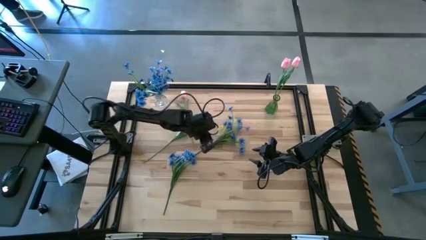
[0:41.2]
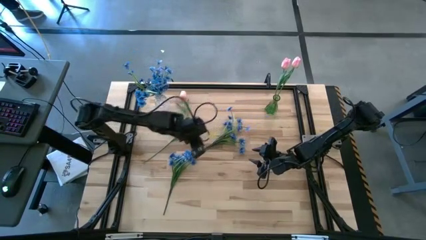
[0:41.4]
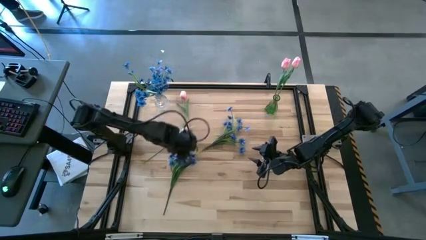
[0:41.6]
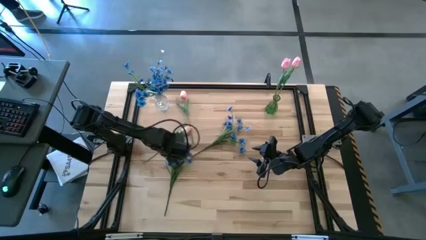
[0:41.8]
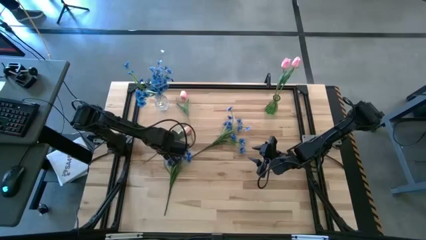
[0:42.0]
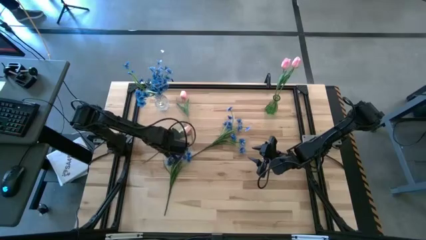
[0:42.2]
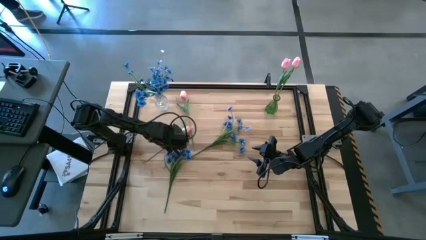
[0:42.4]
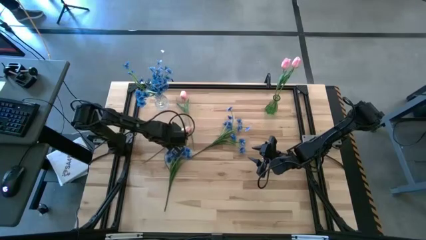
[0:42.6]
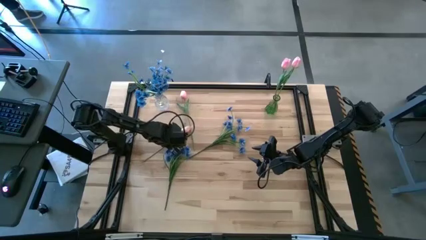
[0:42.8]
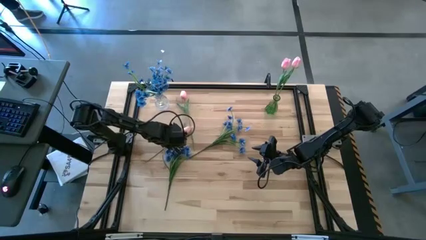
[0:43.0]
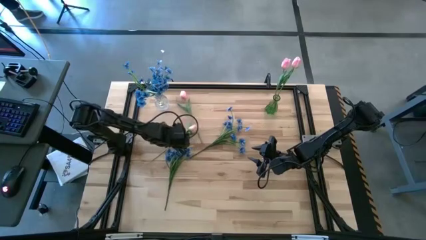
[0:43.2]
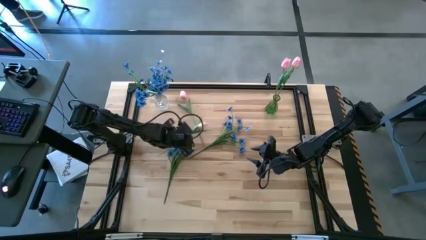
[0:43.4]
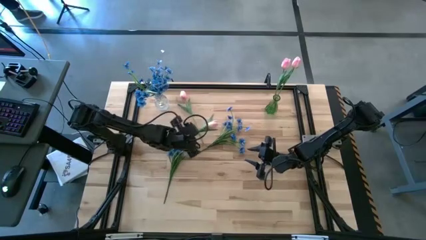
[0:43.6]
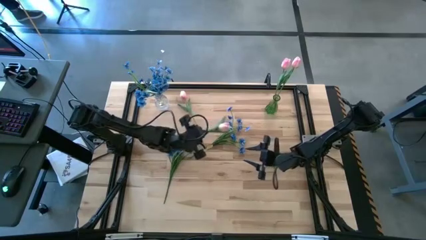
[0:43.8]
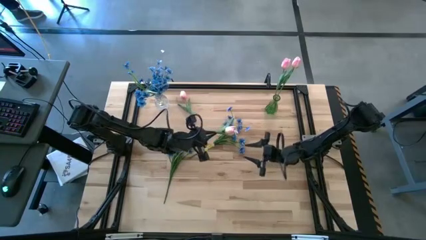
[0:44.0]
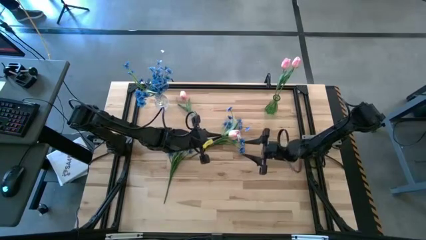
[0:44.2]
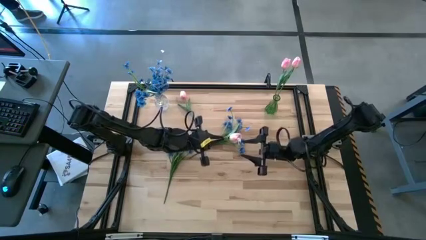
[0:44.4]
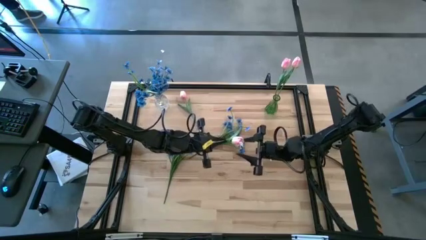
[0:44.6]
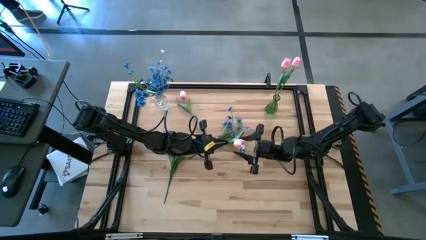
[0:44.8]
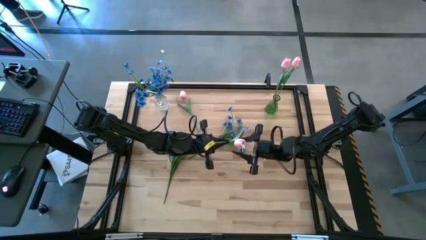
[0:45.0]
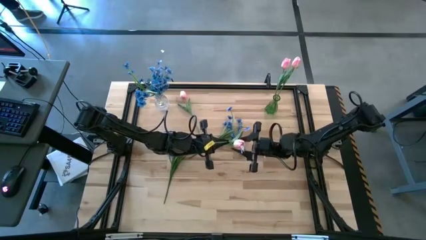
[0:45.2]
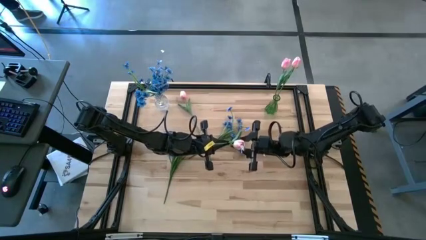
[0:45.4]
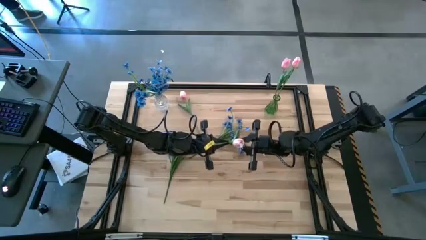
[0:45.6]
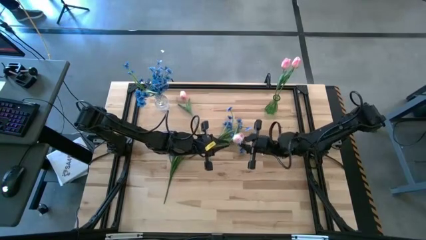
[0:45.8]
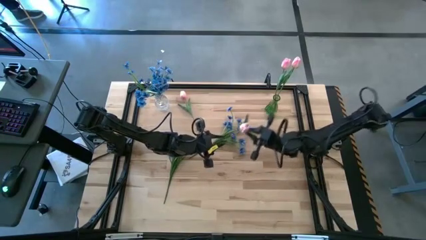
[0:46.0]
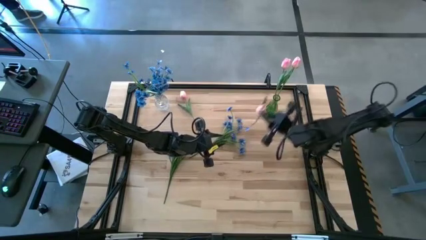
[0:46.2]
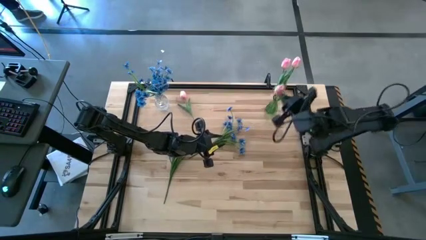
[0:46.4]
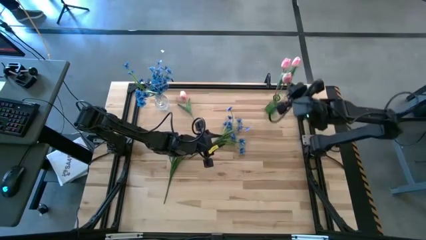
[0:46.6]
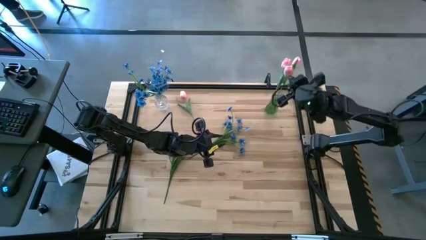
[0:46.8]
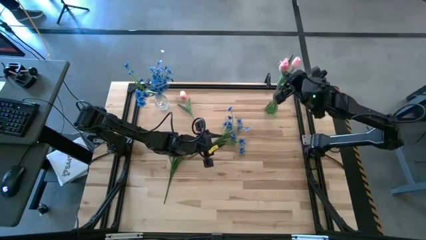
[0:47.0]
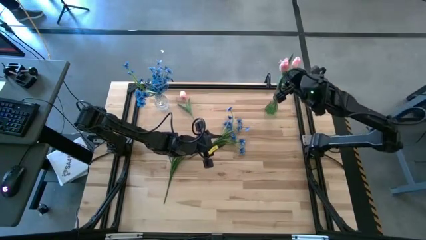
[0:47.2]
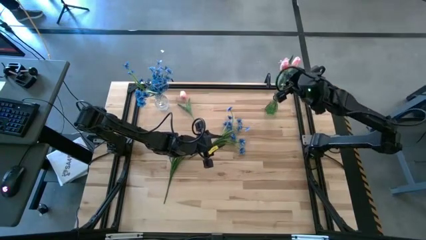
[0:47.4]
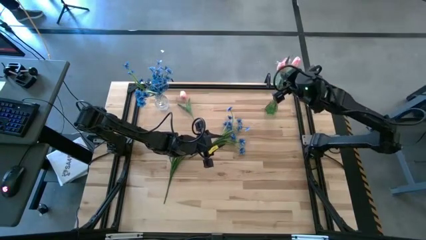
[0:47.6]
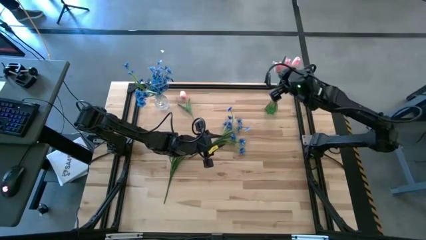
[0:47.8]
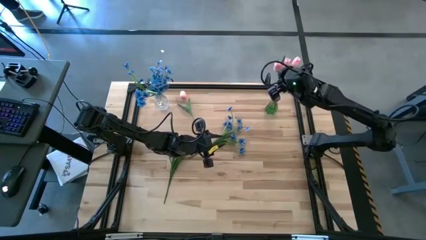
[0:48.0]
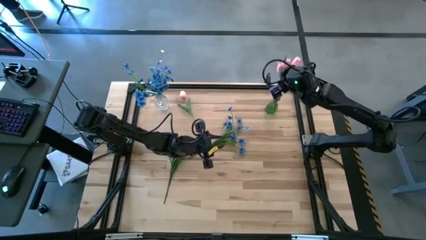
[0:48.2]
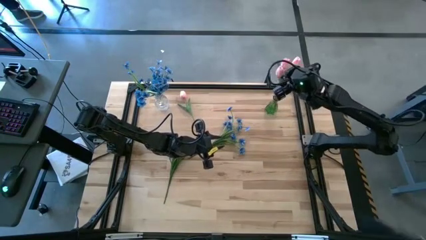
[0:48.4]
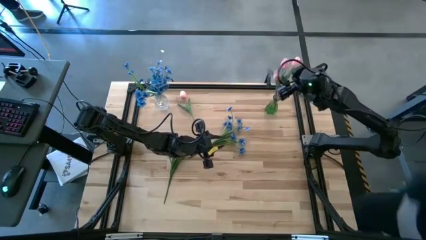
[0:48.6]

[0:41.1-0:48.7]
Task: Sort flowers into vase by color
Put the bottom pink tulip into the green vase

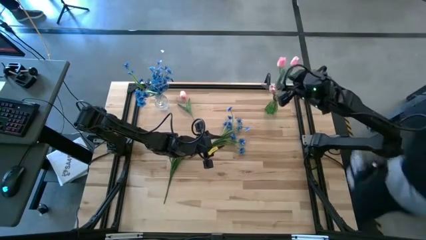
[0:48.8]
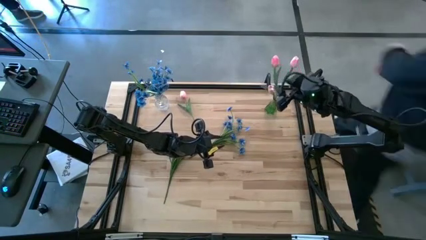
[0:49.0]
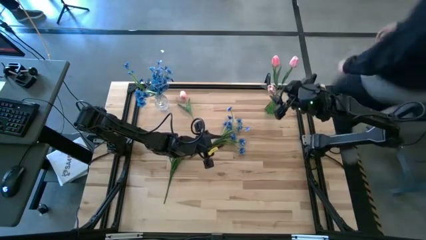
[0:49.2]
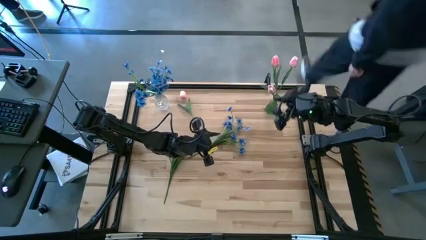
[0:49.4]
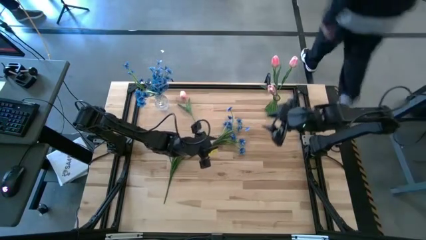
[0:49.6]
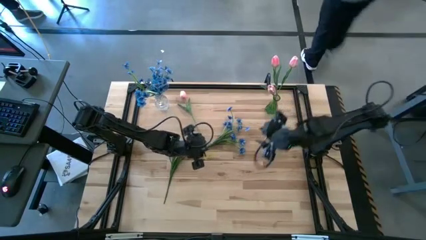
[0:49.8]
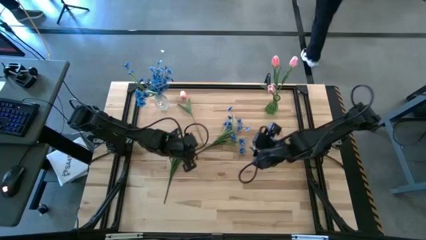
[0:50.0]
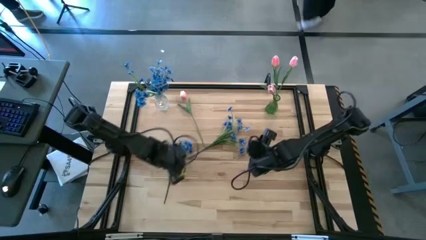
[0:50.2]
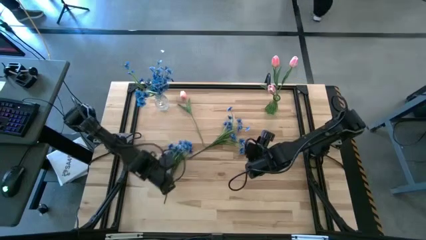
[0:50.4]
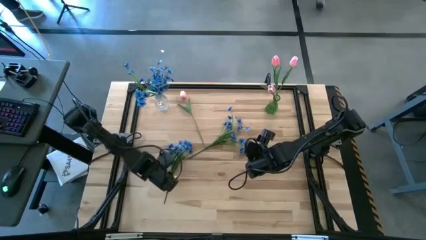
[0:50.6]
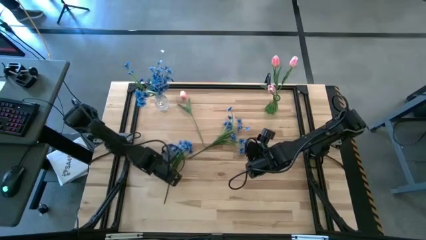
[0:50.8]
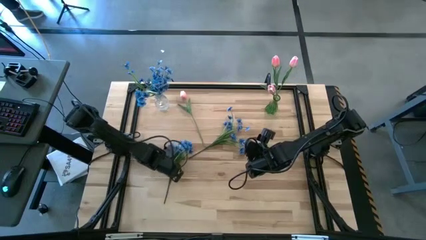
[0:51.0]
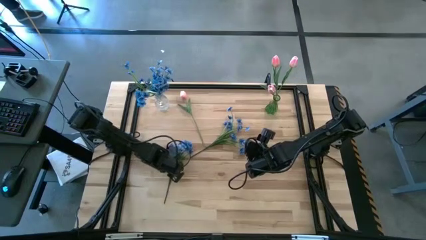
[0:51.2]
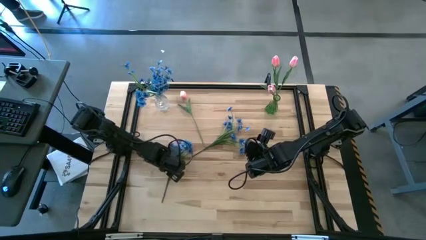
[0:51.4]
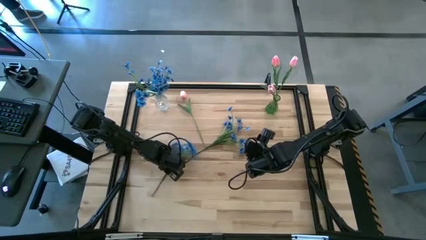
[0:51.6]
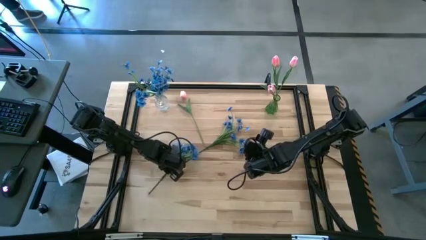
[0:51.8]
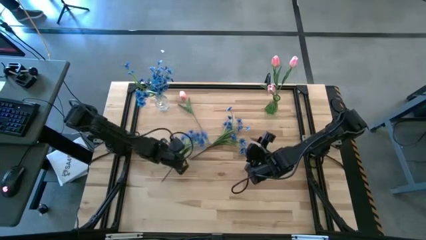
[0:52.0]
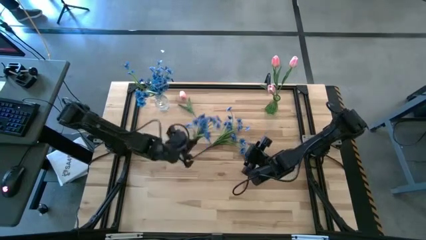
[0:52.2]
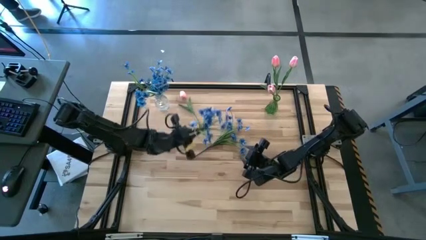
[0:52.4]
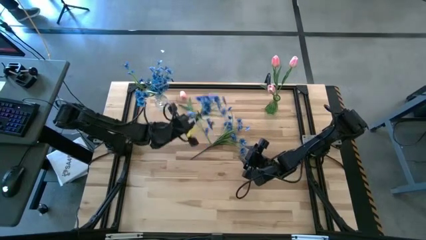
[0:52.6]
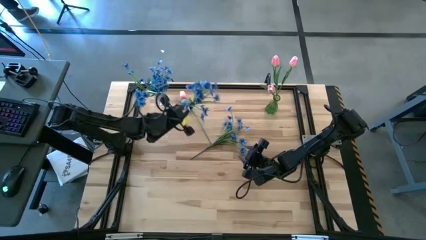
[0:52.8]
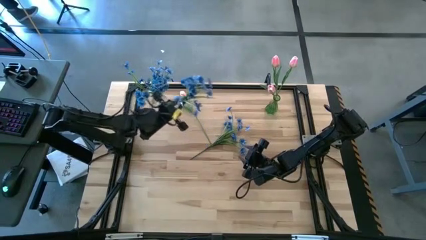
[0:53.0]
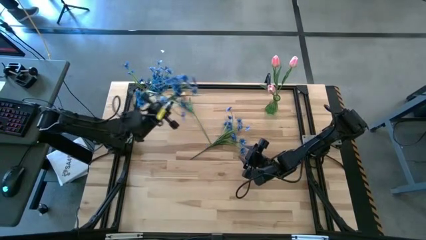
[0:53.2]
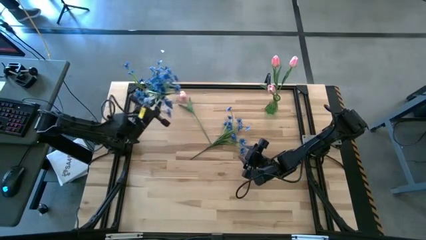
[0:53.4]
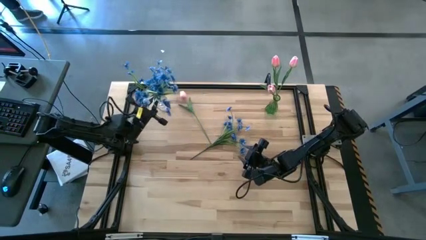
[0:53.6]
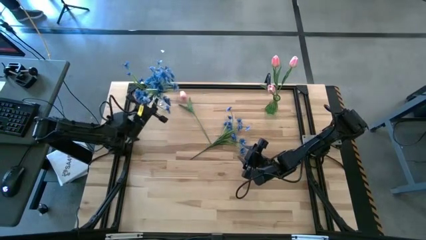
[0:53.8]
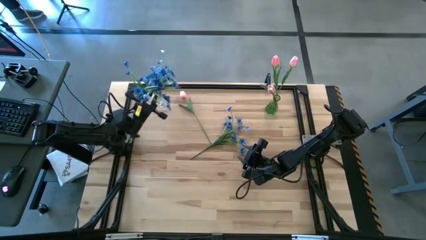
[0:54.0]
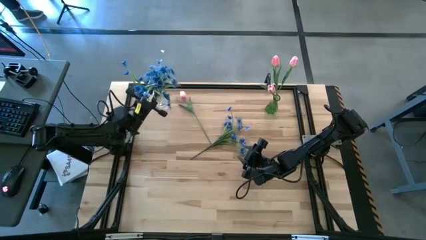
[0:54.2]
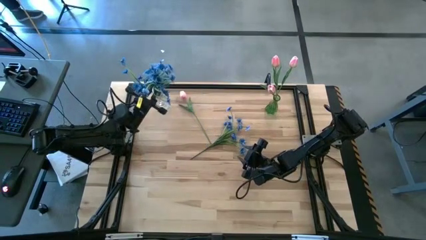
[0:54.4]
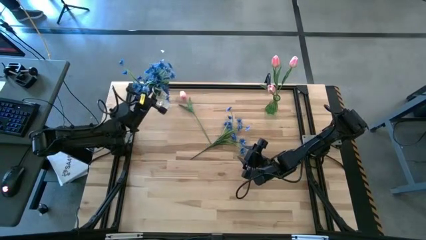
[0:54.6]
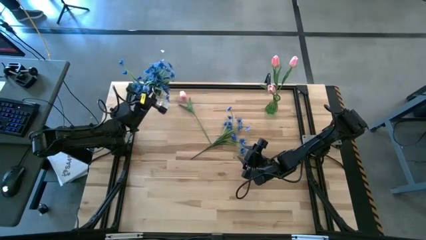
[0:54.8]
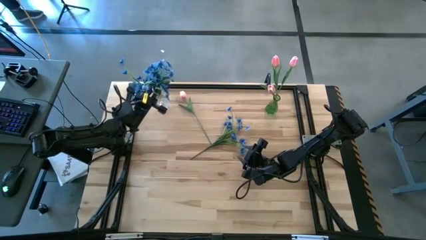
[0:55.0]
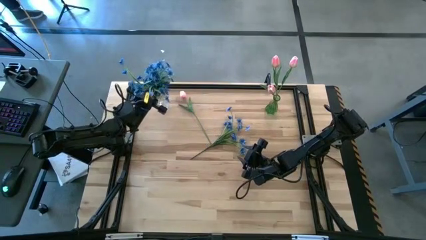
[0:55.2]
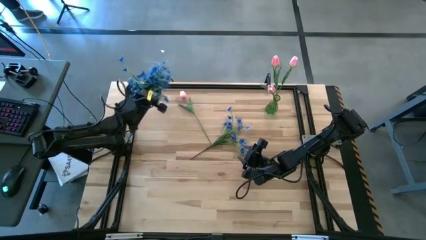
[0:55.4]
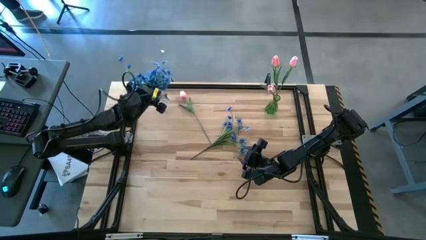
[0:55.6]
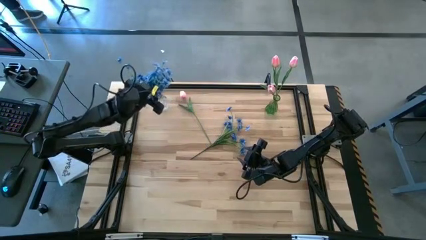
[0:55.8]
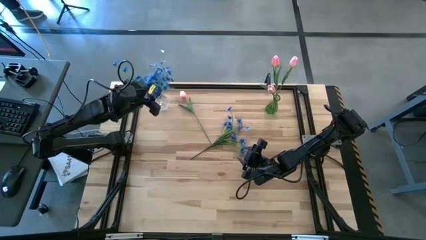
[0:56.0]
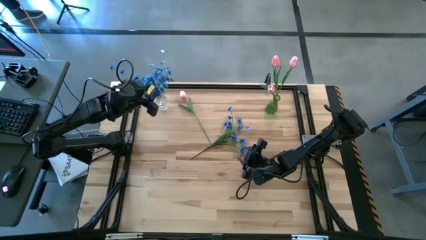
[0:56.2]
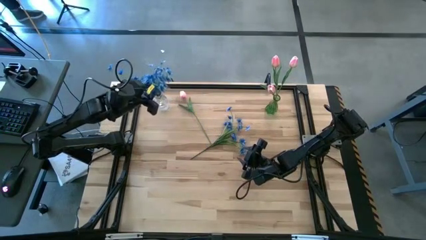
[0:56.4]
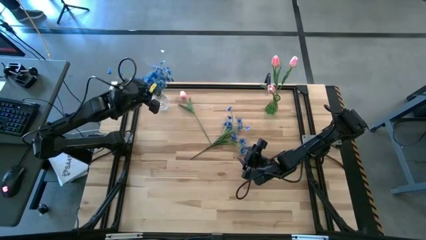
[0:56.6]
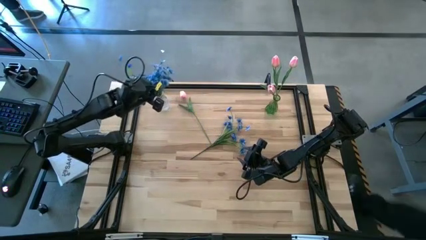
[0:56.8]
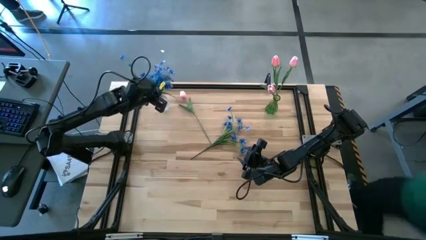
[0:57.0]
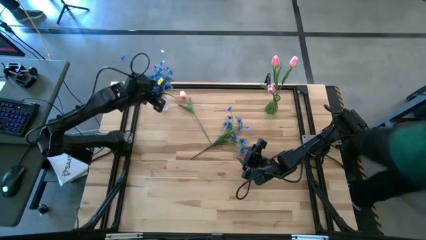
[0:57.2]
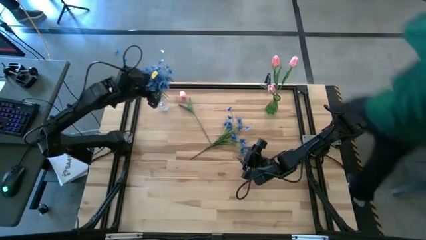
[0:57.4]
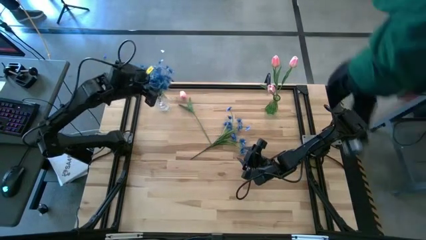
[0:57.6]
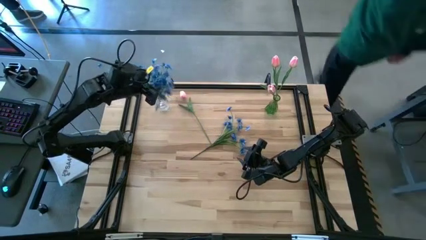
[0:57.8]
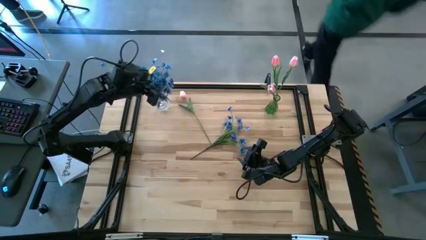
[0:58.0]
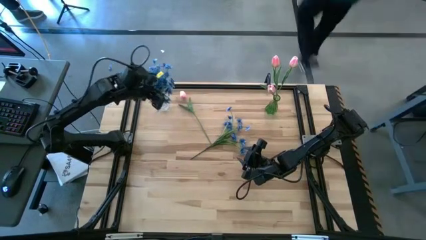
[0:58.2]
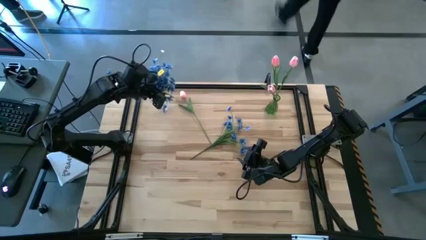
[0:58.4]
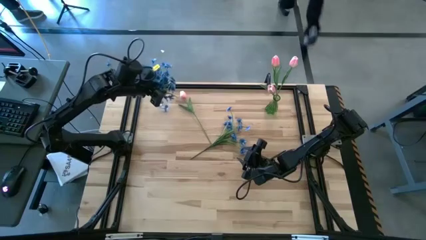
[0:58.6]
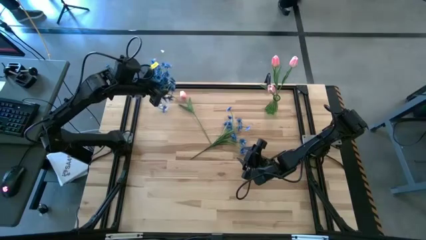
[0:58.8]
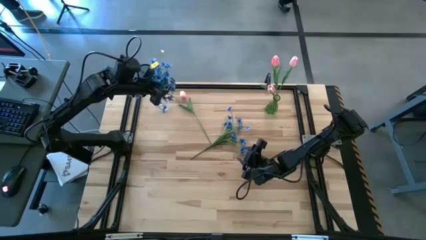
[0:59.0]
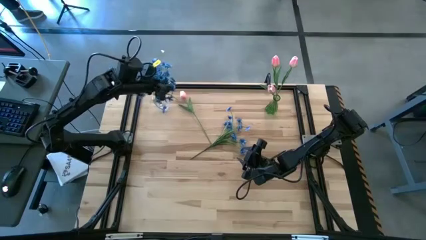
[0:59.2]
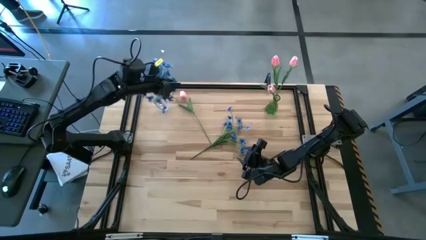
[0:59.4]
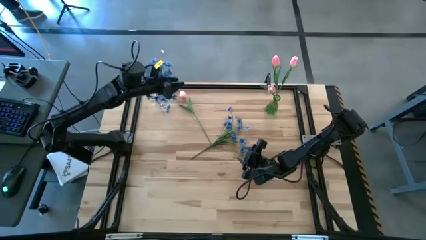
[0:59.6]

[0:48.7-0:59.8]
Put the left blue flowers into the transparent vase
